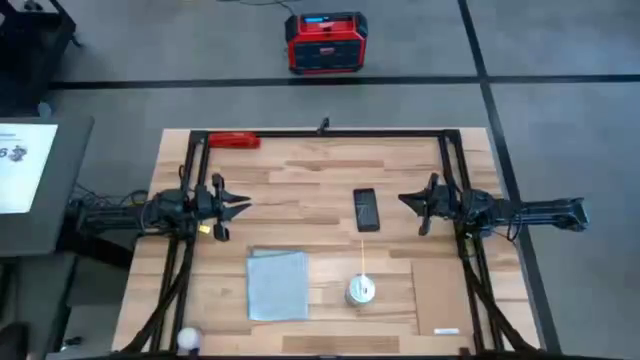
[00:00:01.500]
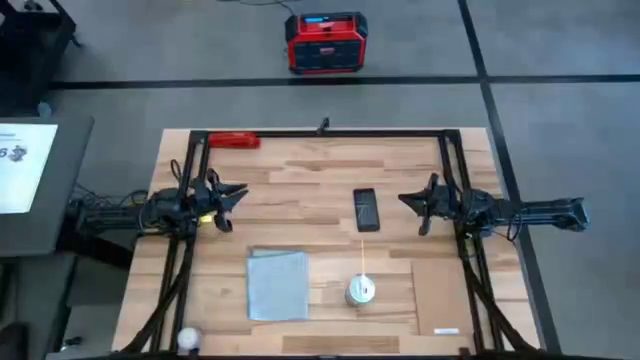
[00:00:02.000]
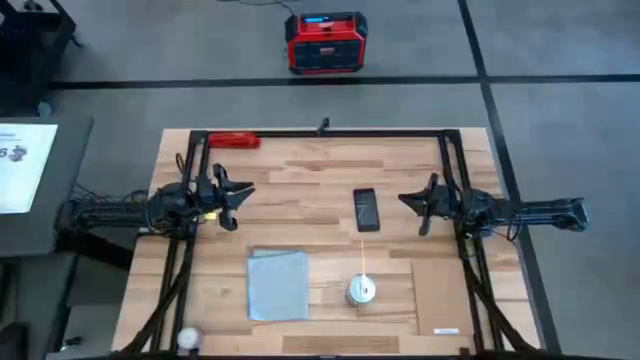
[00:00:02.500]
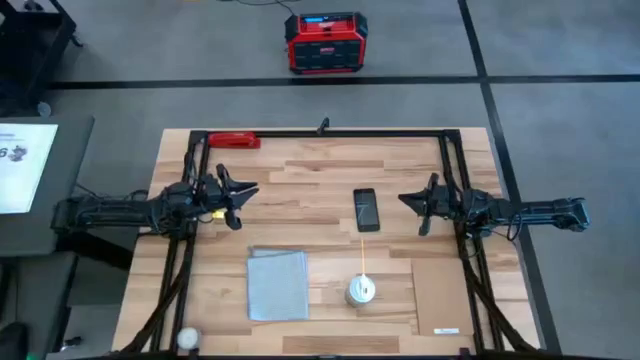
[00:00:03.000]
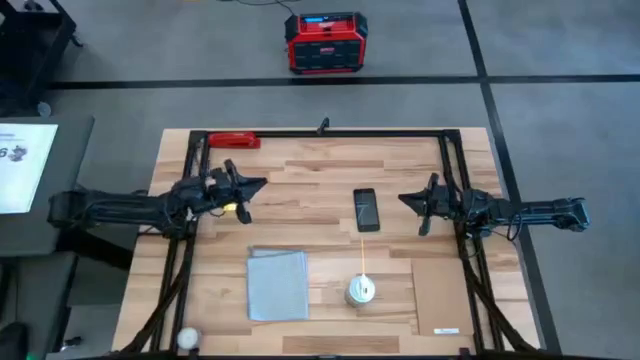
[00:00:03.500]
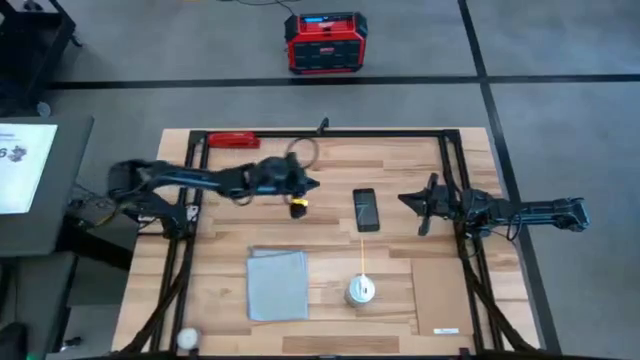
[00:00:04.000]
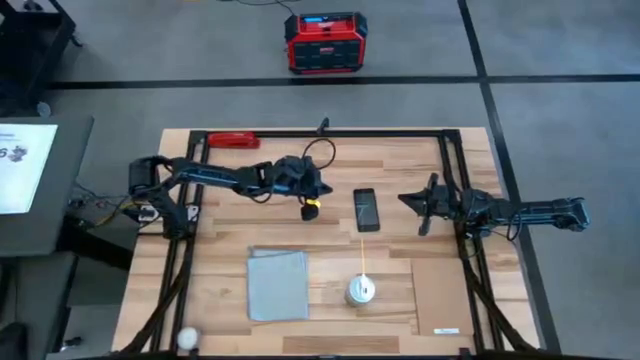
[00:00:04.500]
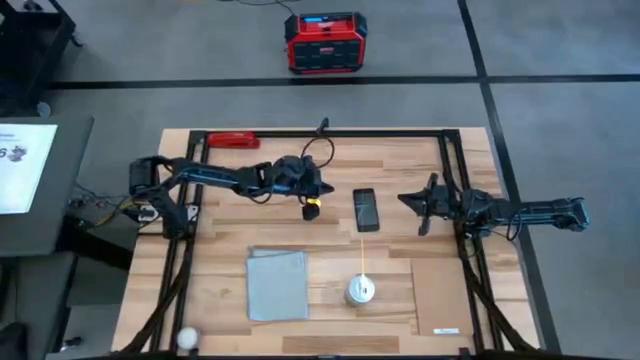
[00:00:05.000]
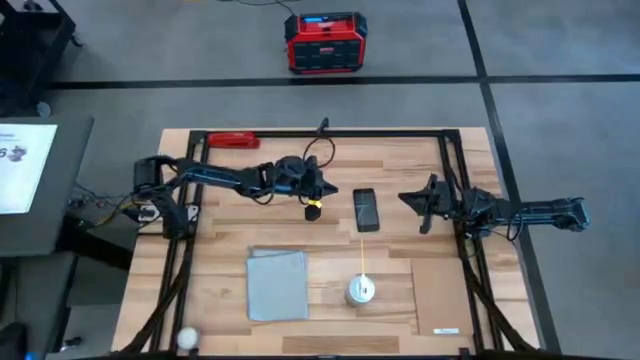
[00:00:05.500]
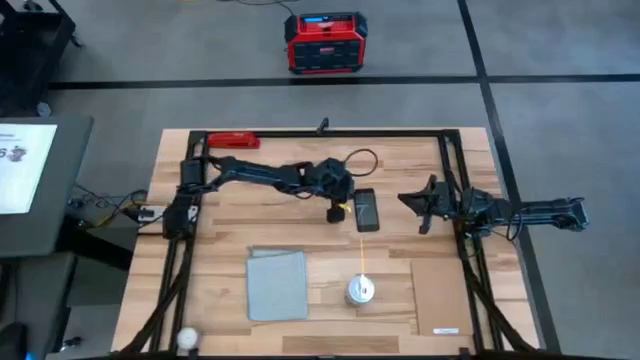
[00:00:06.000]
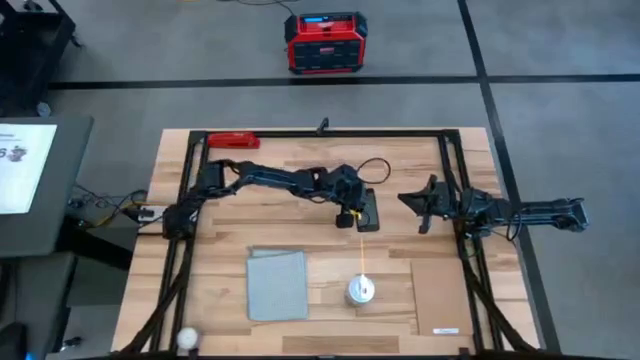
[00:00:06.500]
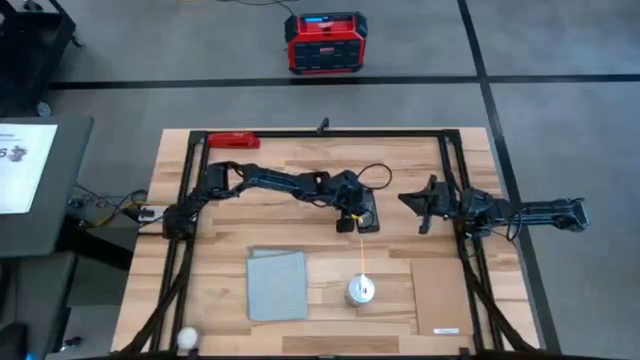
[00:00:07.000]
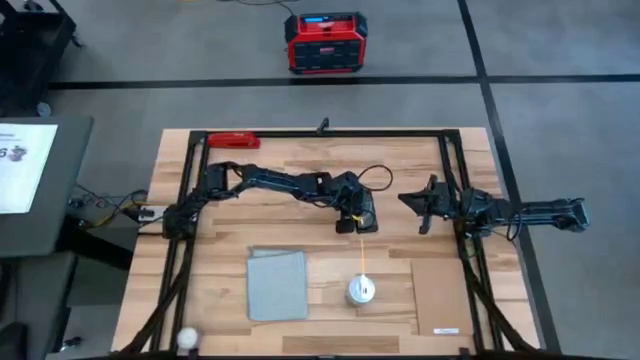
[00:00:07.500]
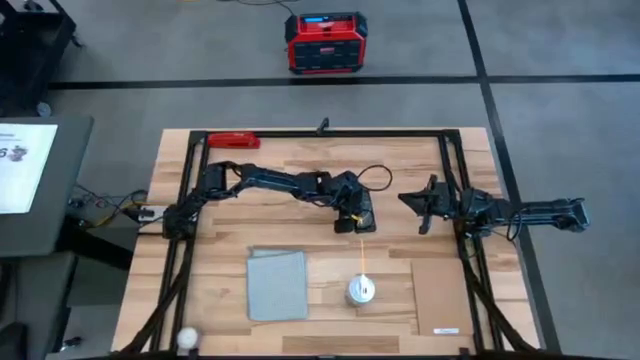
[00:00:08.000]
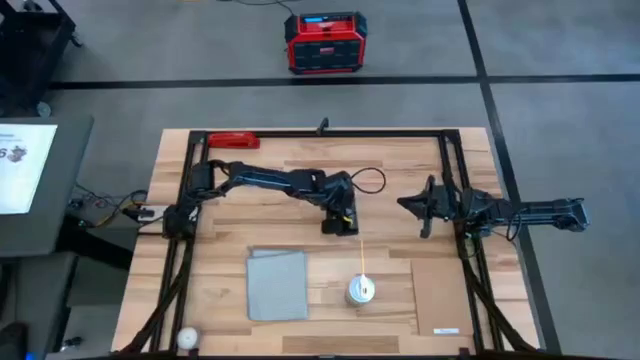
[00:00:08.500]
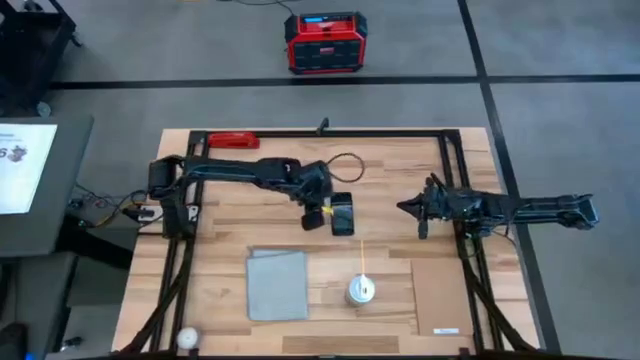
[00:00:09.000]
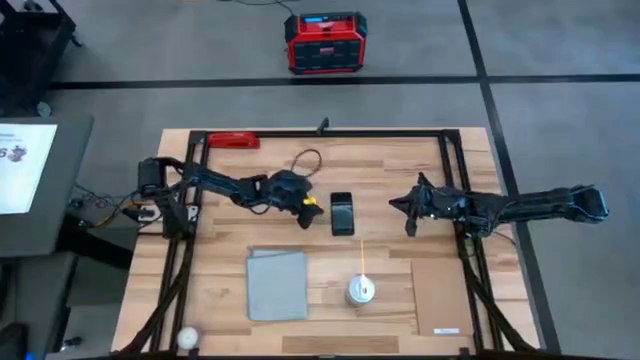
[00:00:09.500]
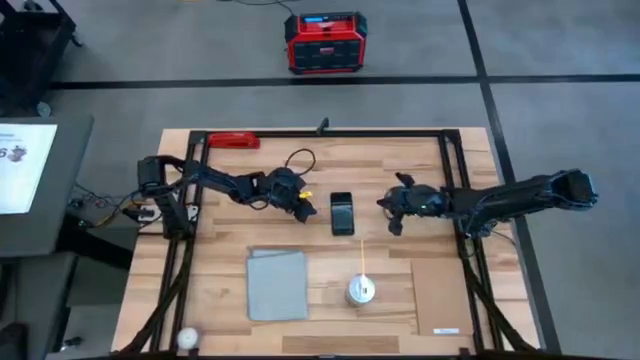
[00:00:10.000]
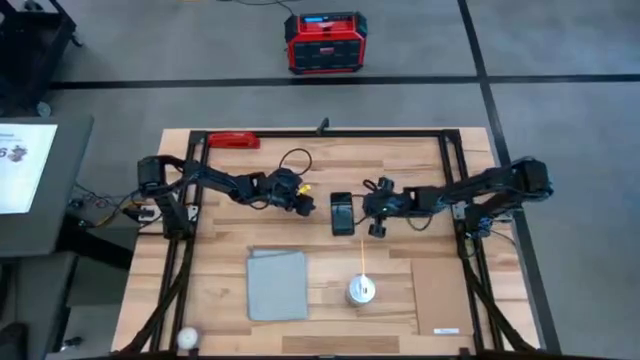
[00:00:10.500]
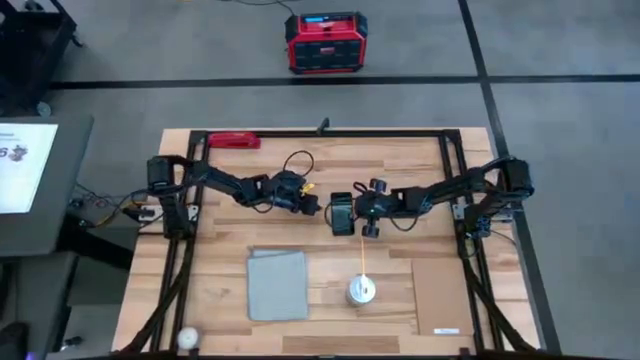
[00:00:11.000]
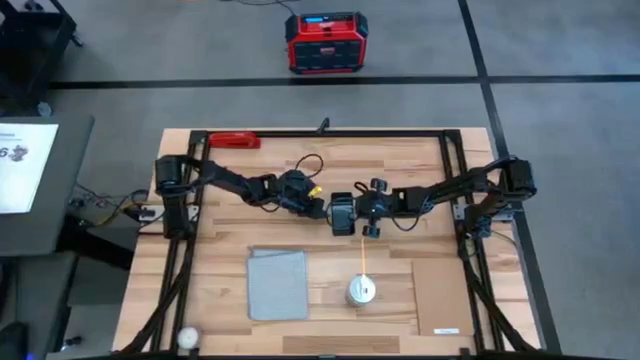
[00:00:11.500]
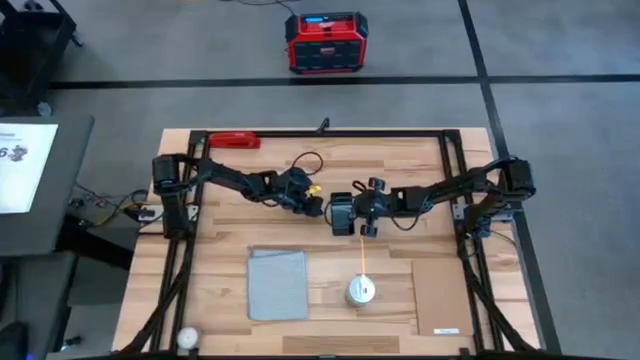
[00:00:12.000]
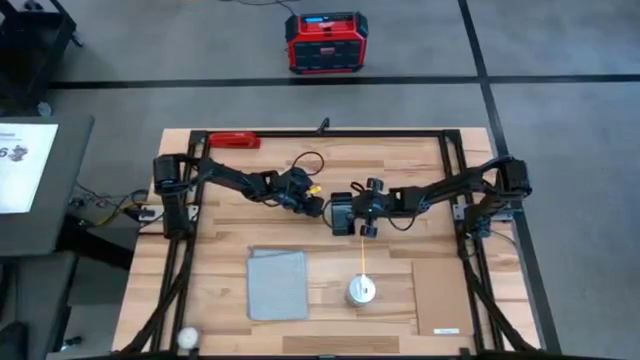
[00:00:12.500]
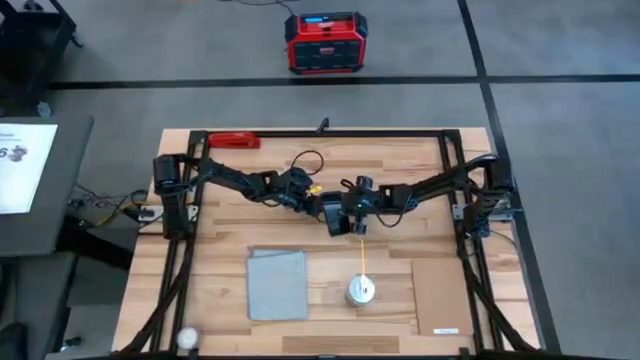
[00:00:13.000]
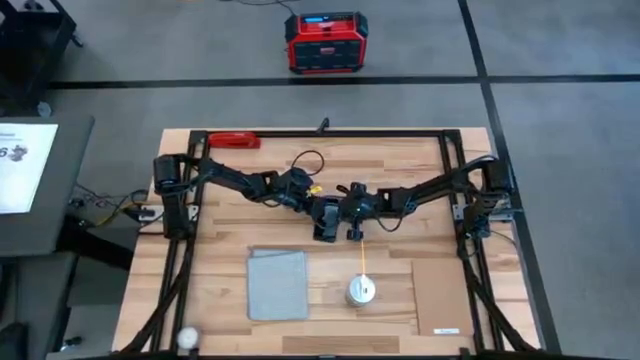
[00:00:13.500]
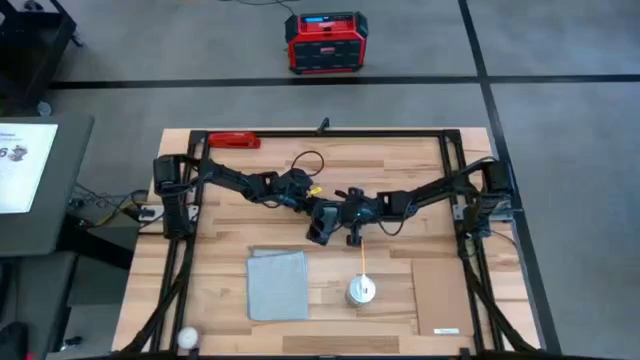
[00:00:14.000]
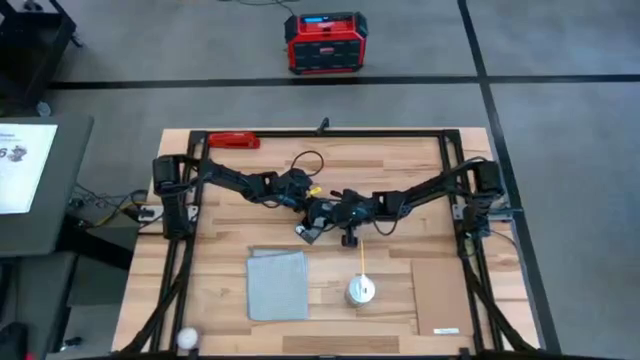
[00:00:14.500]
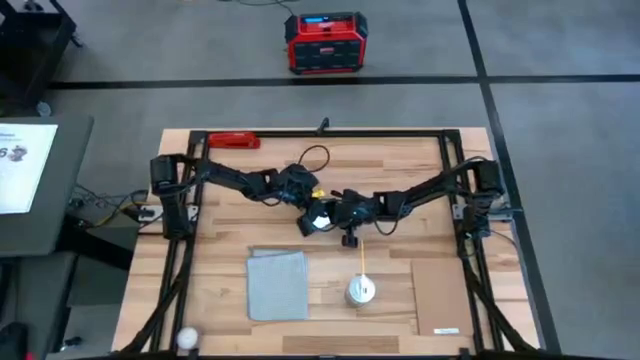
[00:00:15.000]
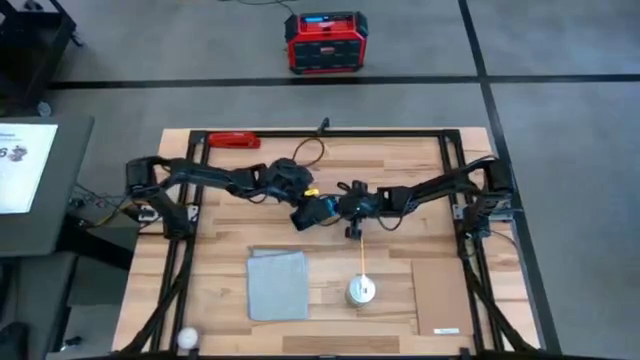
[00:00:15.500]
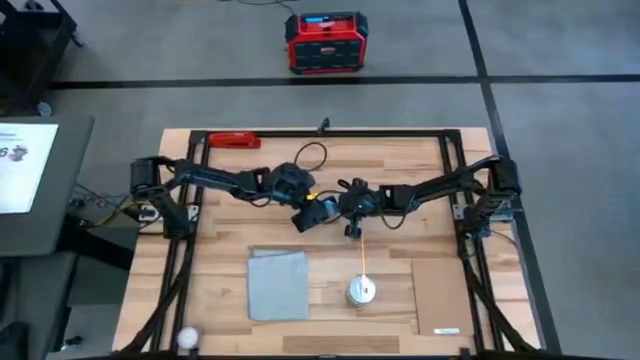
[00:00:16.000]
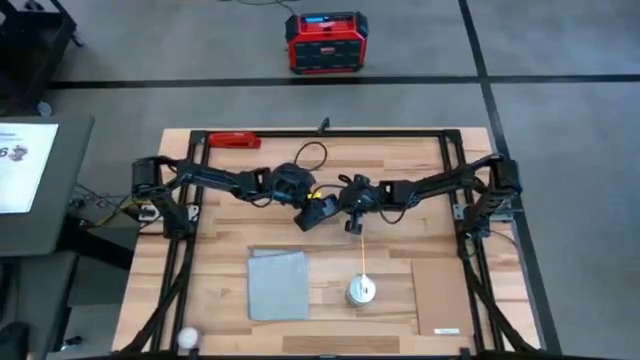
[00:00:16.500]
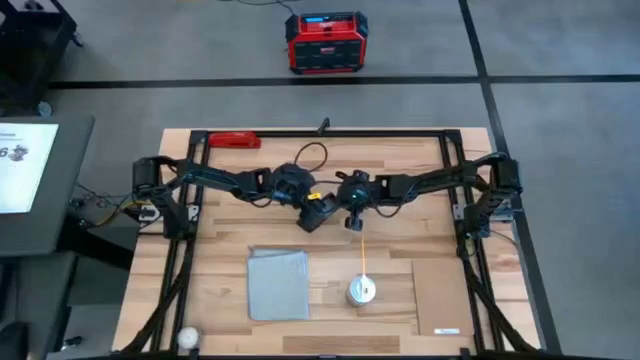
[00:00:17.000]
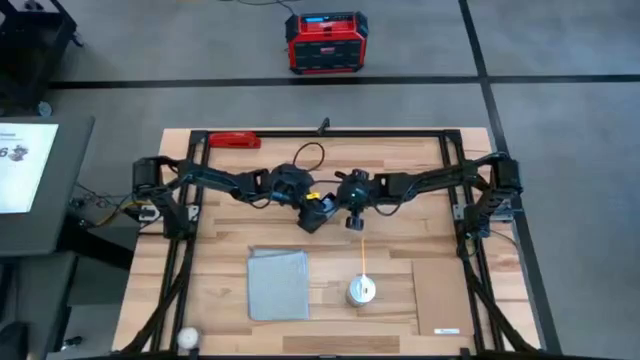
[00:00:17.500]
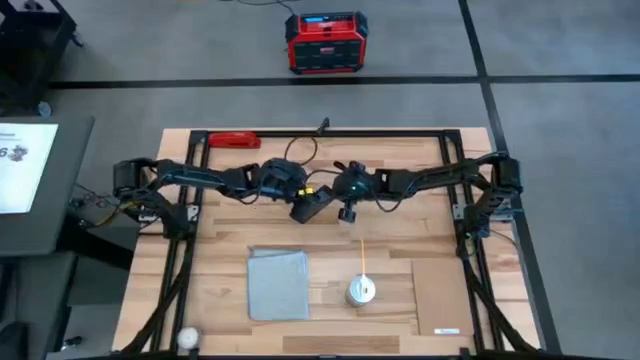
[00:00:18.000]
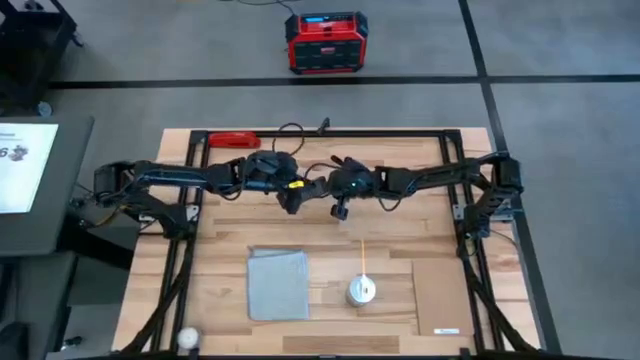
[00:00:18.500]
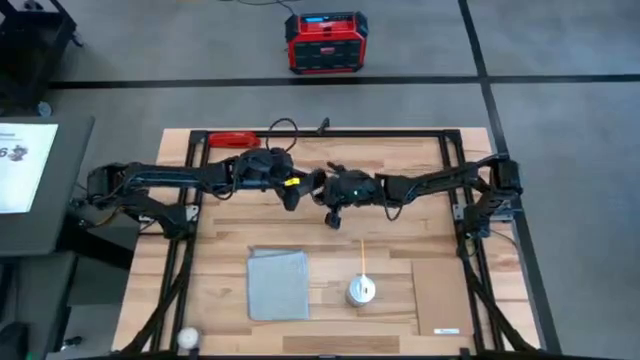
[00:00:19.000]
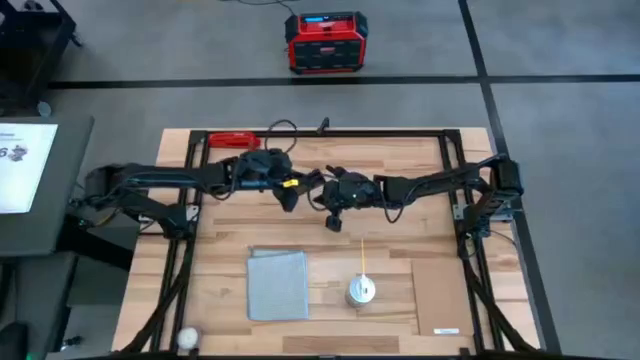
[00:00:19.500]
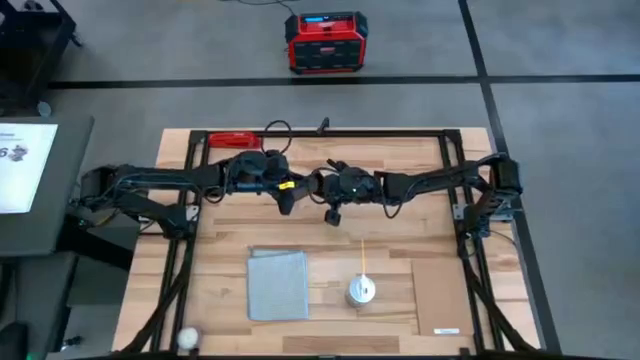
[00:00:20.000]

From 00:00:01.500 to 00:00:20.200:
Task: Apply microfiber cloth
Spray the front of the black phone with the spray bottle
